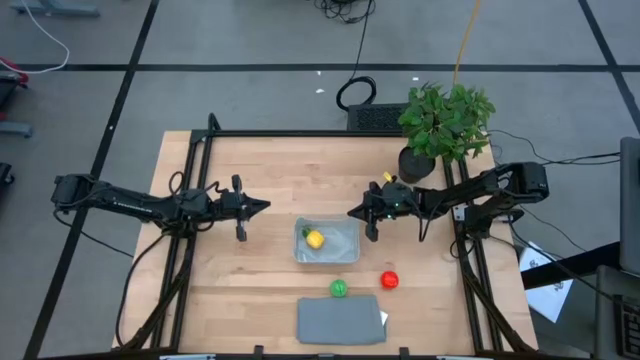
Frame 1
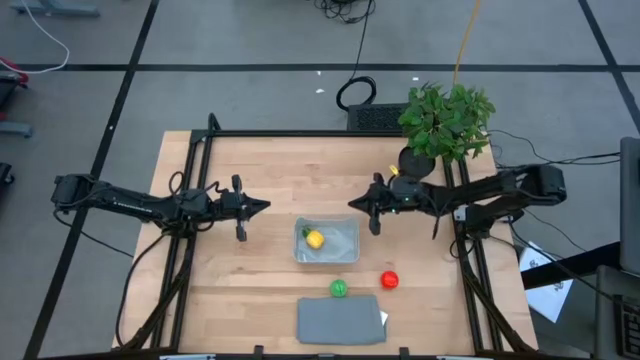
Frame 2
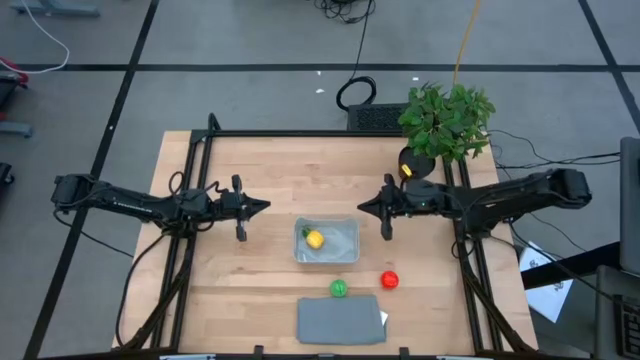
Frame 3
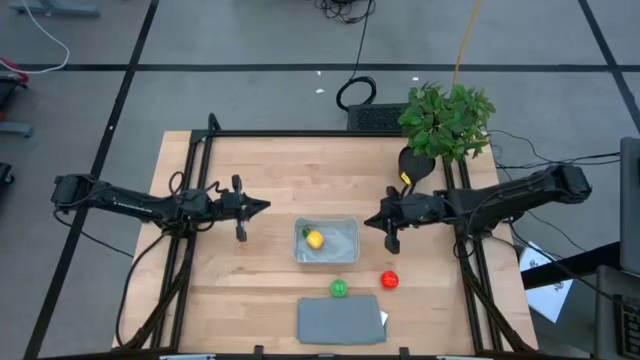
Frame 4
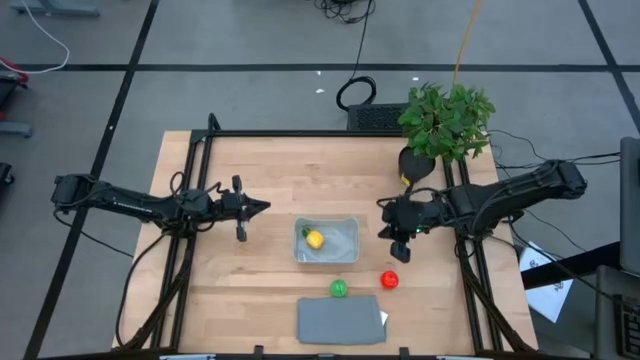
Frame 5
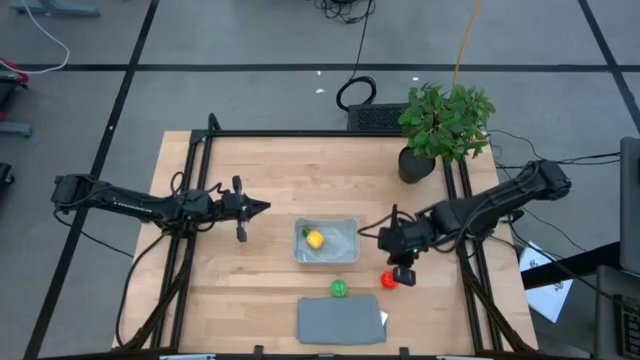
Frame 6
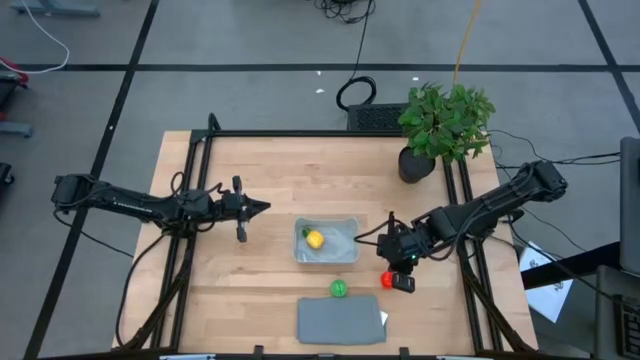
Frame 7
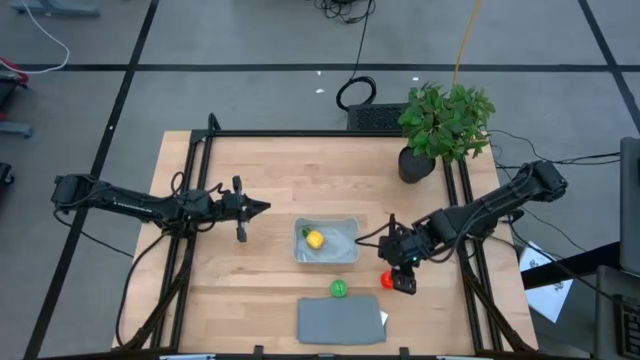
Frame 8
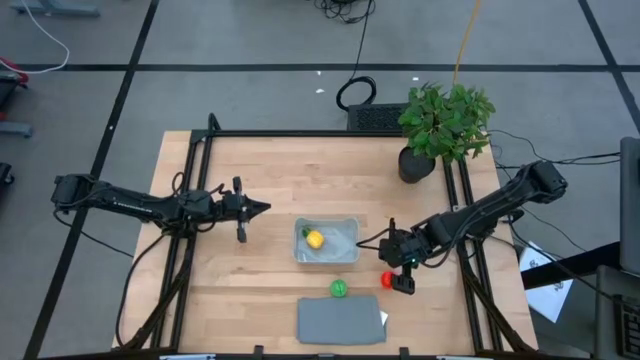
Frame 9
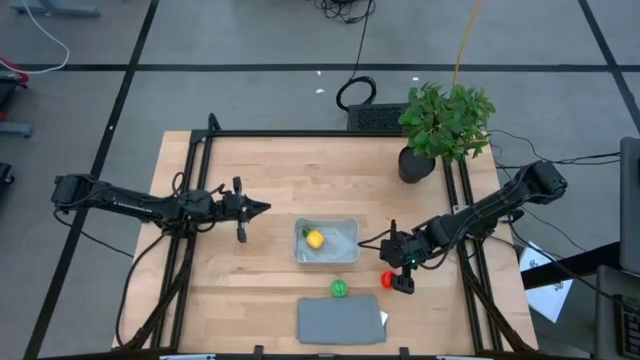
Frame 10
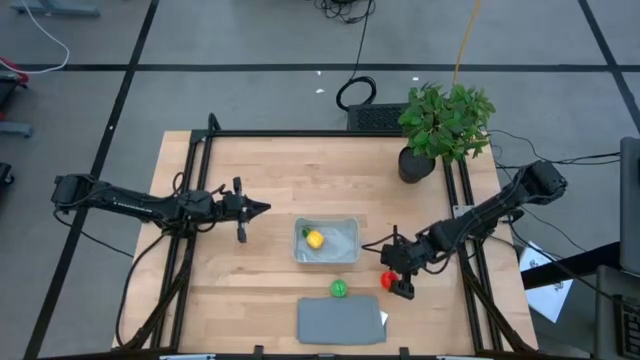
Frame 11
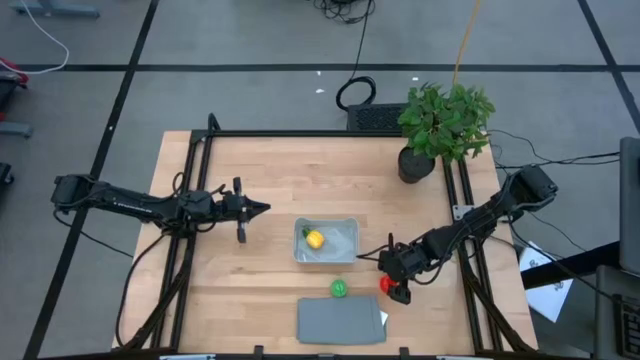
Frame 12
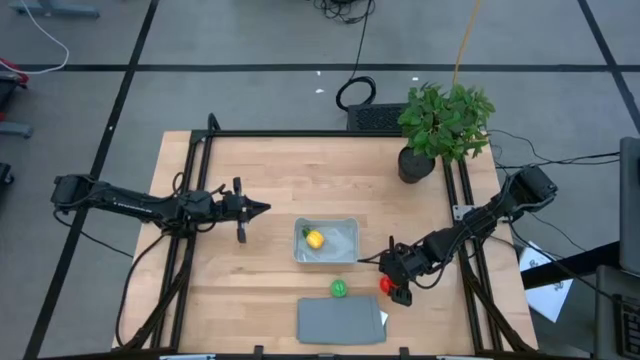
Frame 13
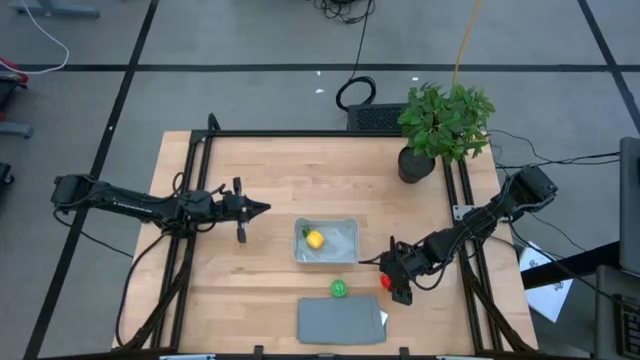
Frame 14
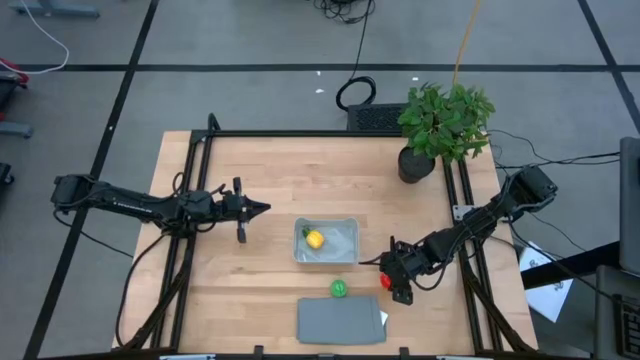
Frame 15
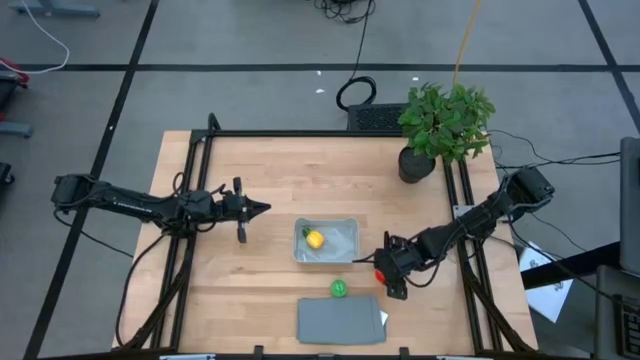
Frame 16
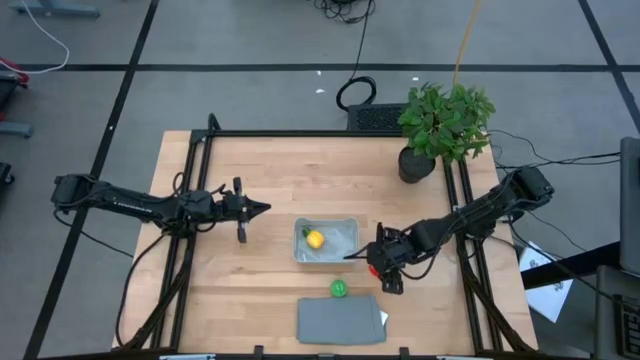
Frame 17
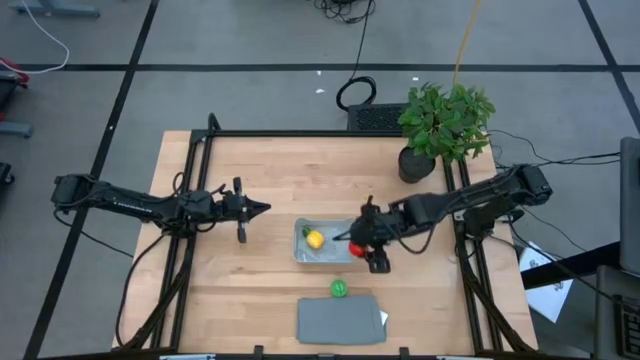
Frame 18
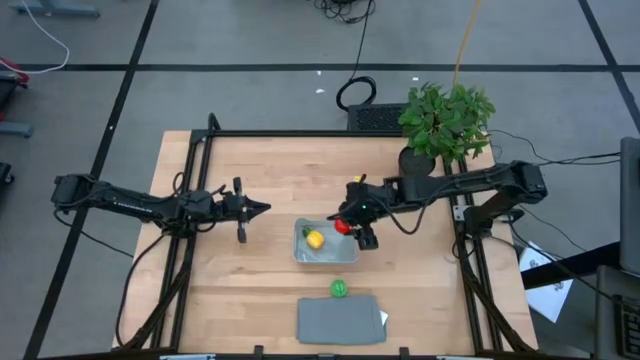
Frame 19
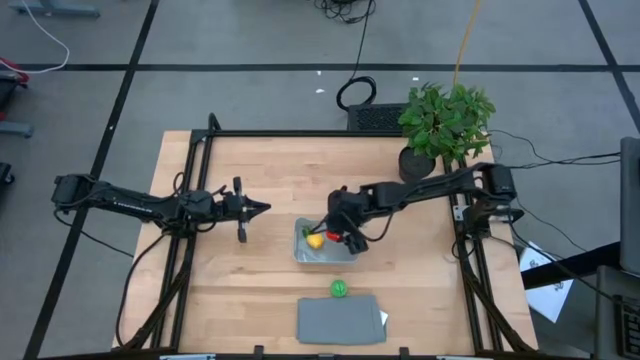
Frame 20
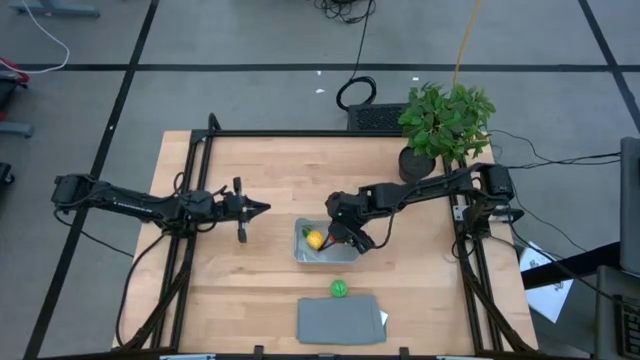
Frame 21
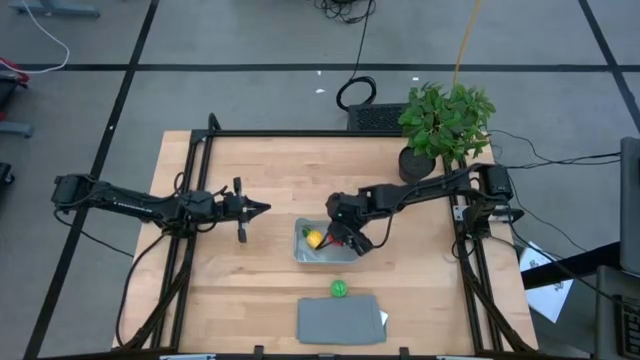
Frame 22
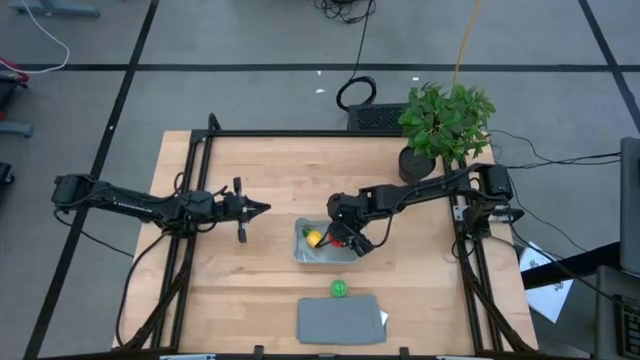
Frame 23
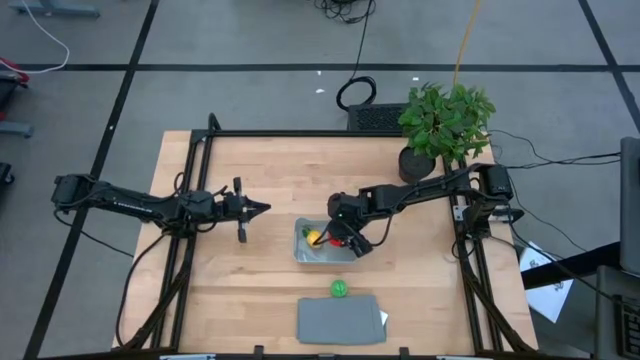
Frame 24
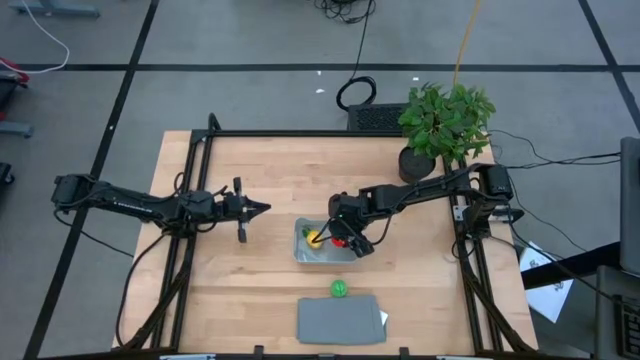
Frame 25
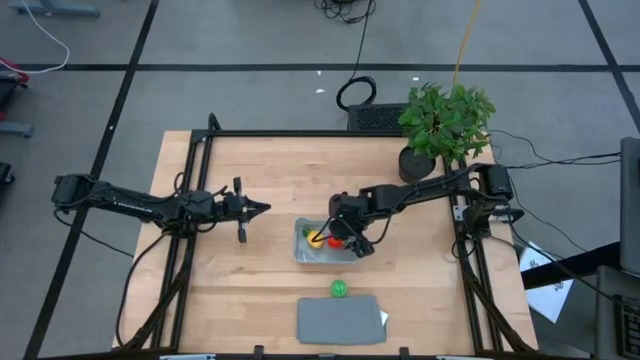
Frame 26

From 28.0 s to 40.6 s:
Task: Pick and placing Produce into tupperware
Put the red tomato into the gray bin

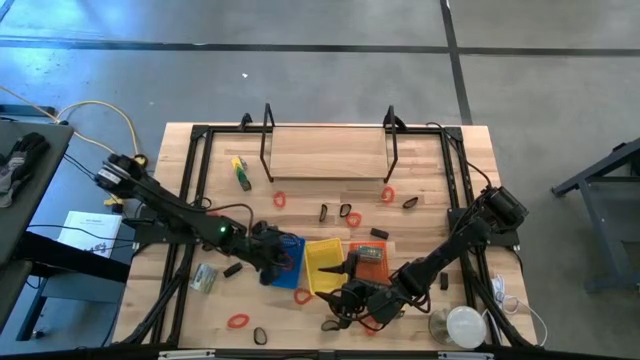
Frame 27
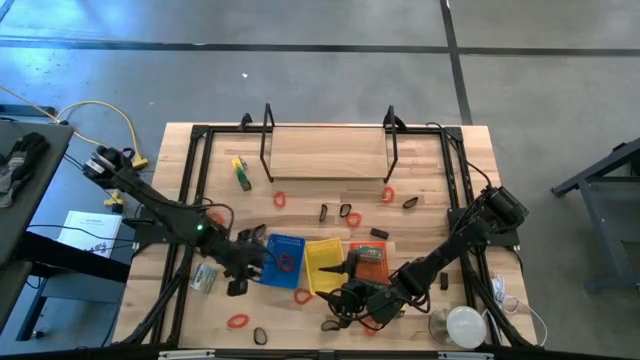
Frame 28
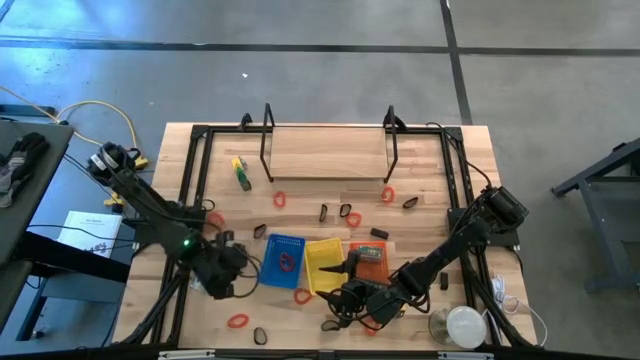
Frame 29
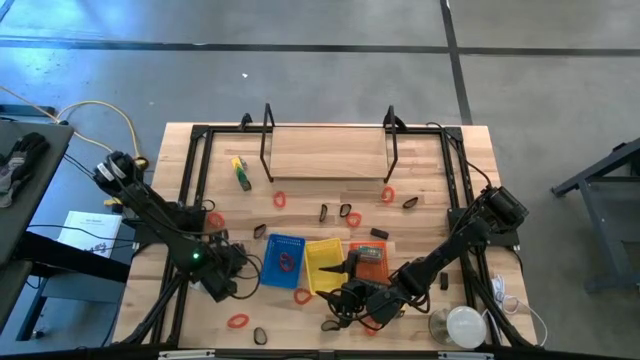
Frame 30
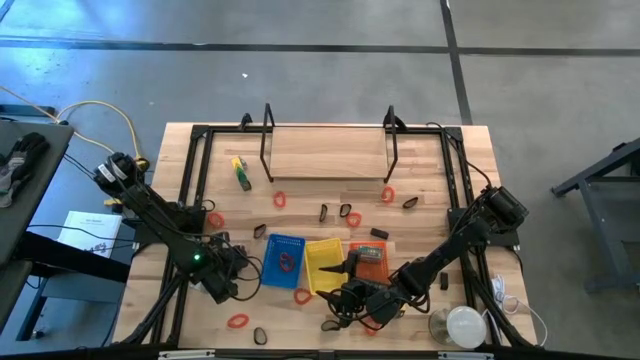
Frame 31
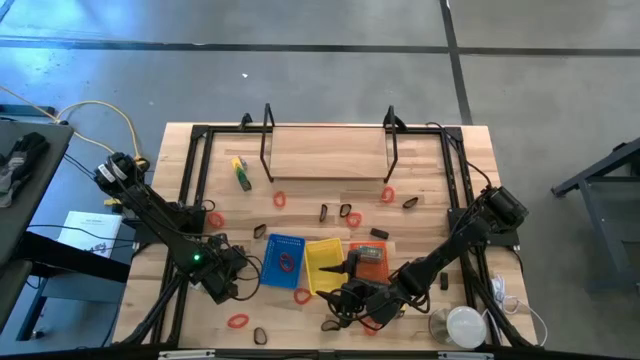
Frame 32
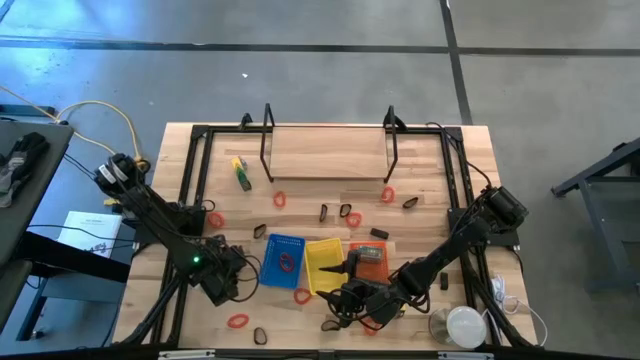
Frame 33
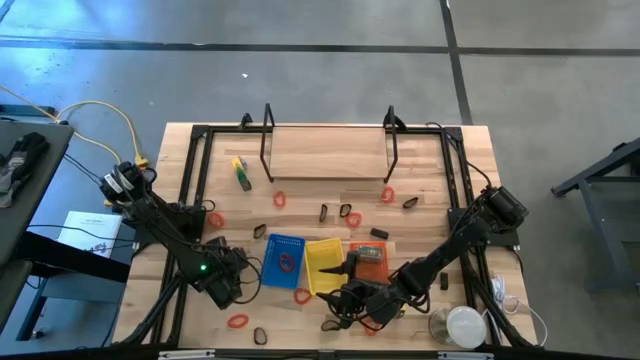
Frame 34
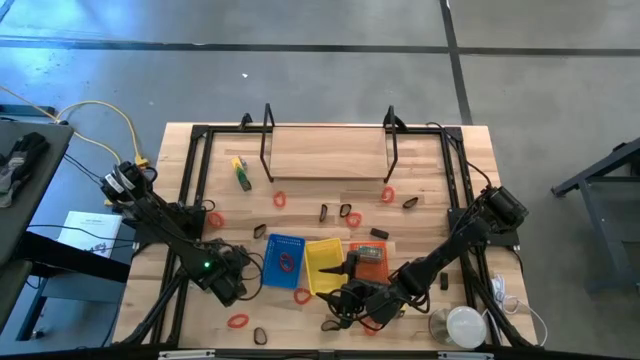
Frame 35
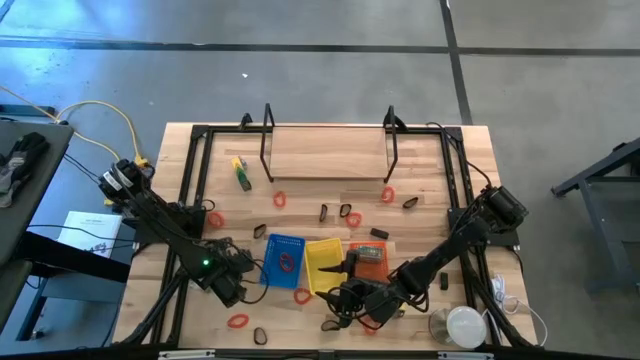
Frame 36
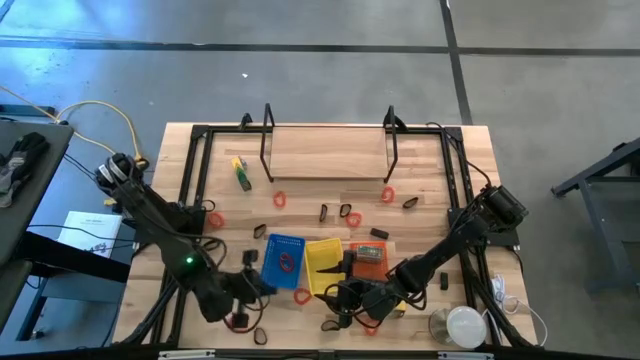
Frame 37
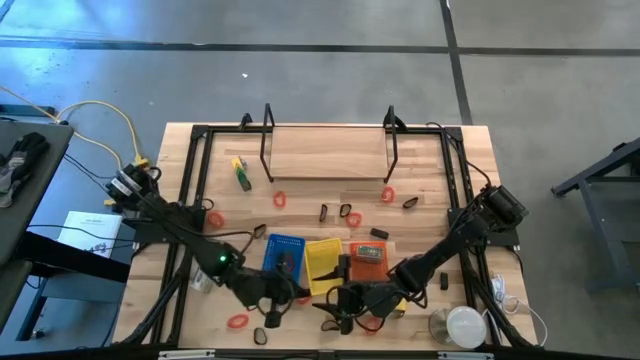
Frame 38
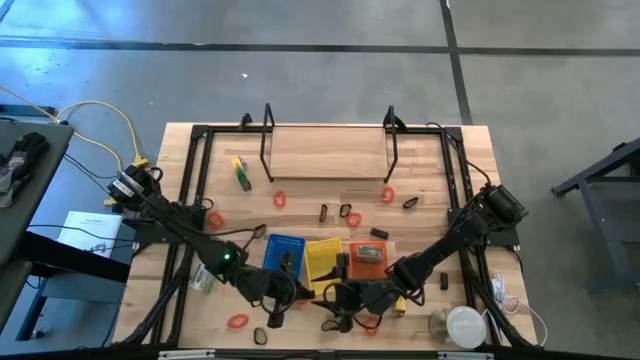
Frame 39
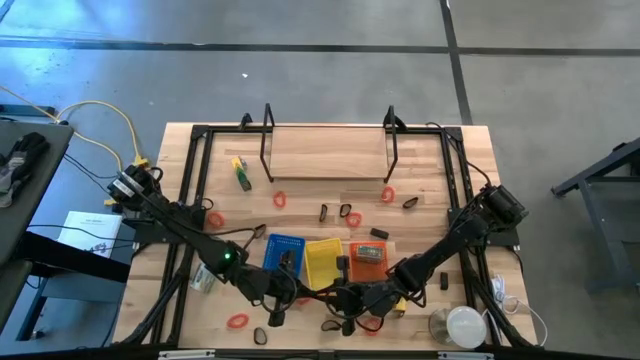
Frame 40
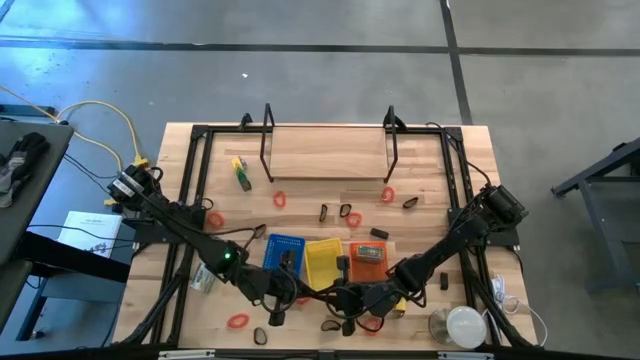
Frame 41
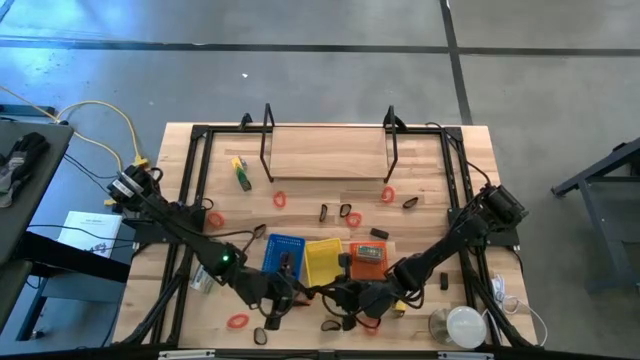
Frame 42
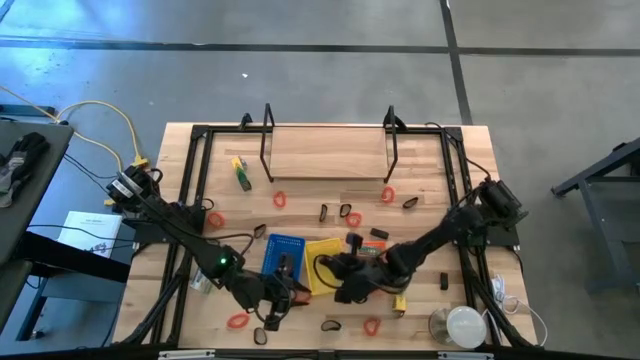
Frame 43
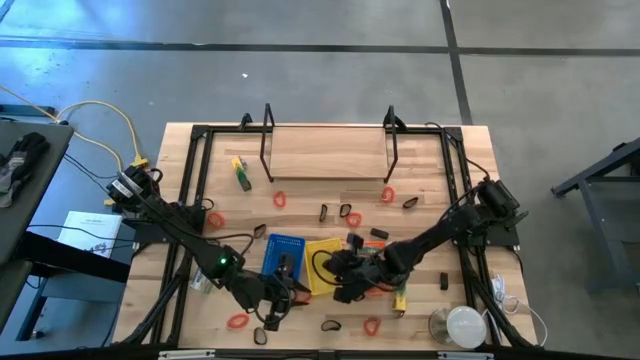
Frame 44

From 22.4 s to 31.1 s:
Task: Pick & Place Office Desk Supplies
Put the black rubber band into the yellow basket
